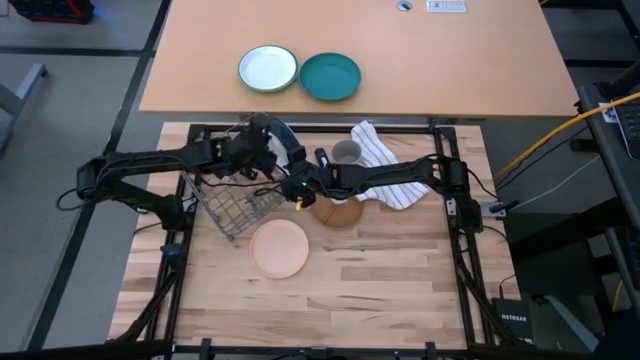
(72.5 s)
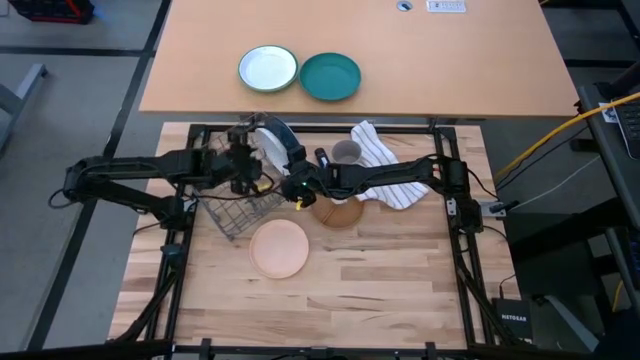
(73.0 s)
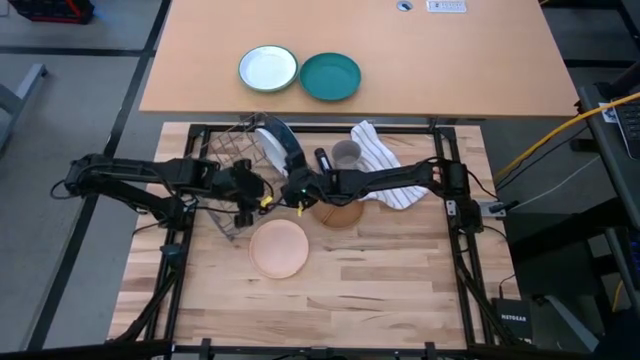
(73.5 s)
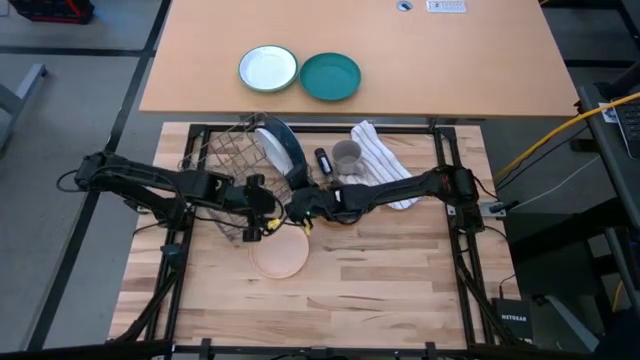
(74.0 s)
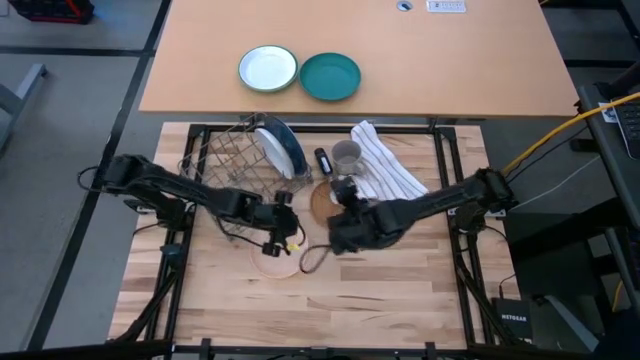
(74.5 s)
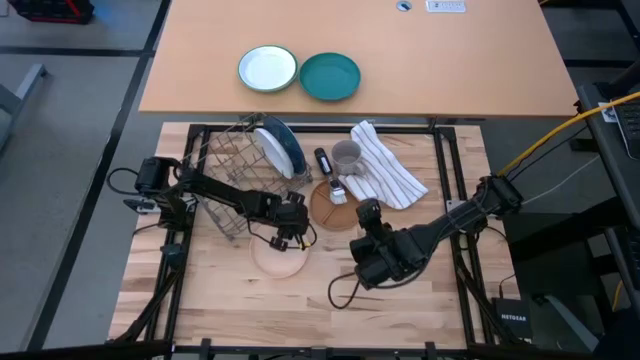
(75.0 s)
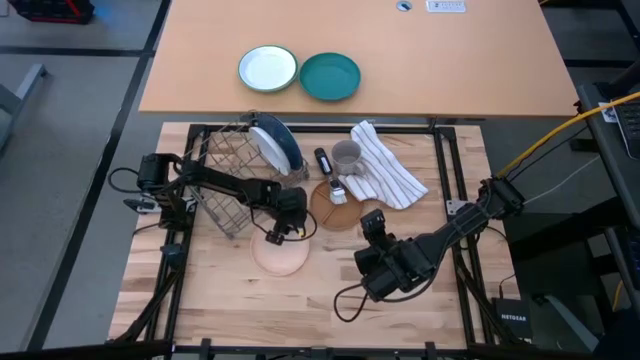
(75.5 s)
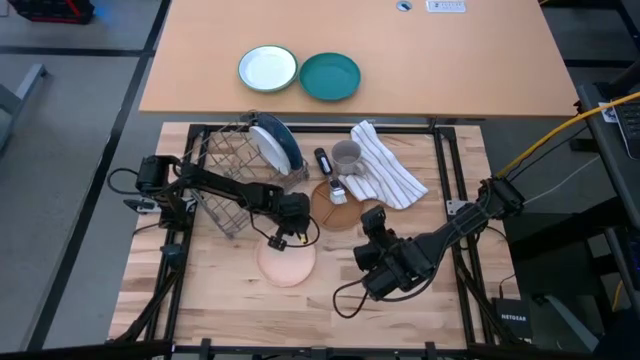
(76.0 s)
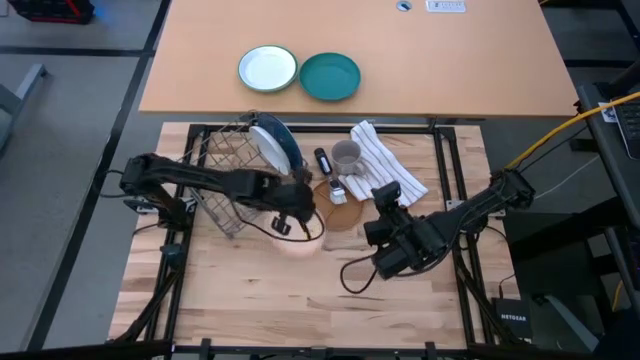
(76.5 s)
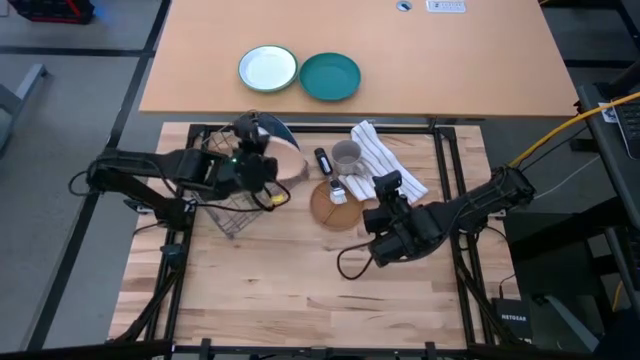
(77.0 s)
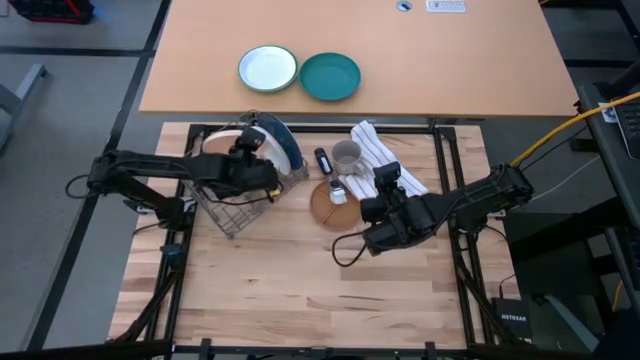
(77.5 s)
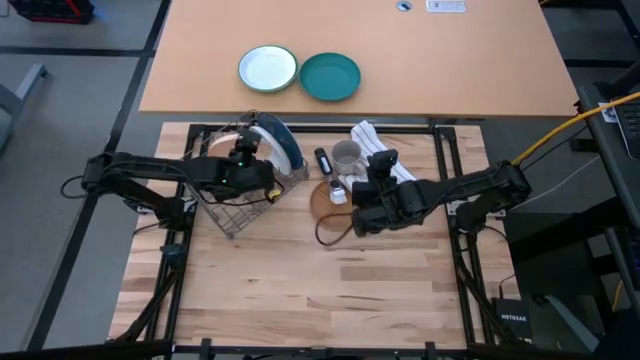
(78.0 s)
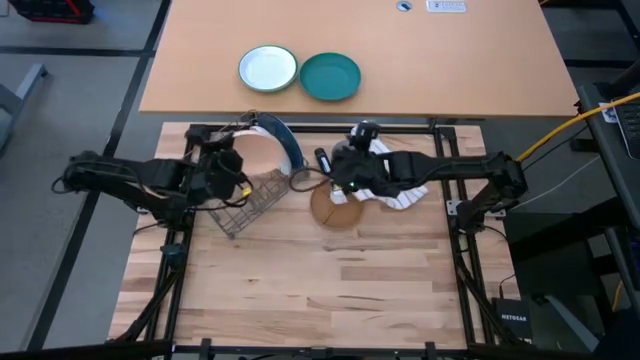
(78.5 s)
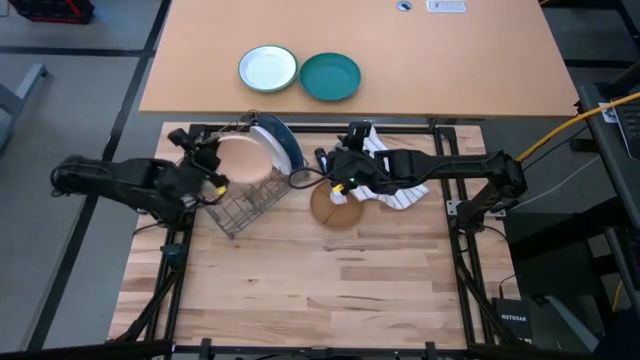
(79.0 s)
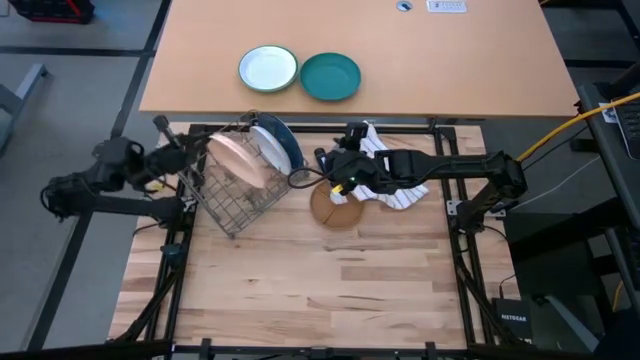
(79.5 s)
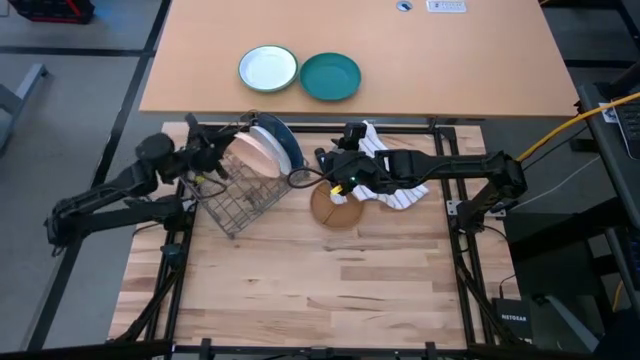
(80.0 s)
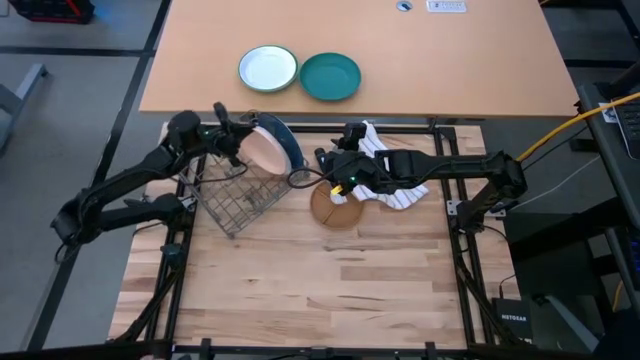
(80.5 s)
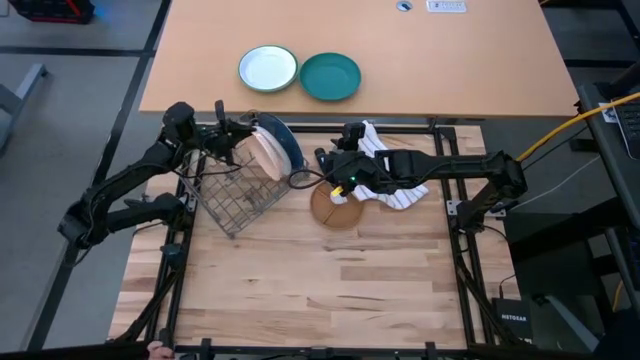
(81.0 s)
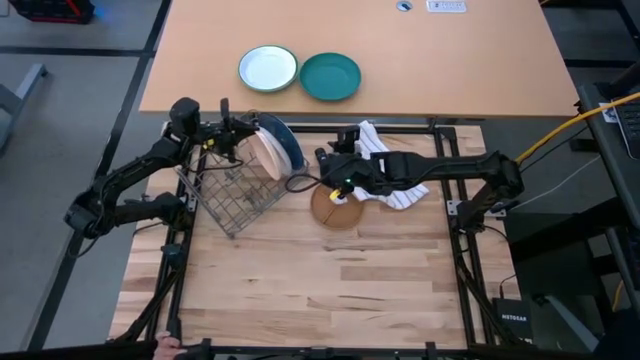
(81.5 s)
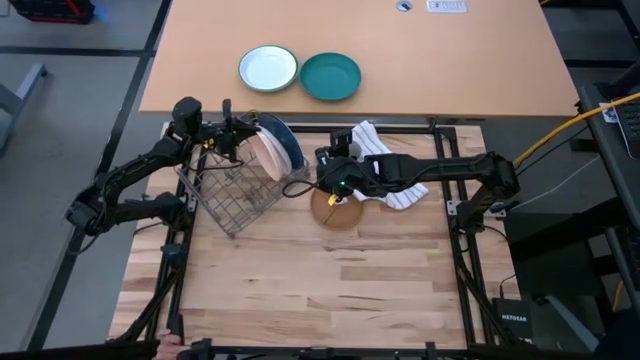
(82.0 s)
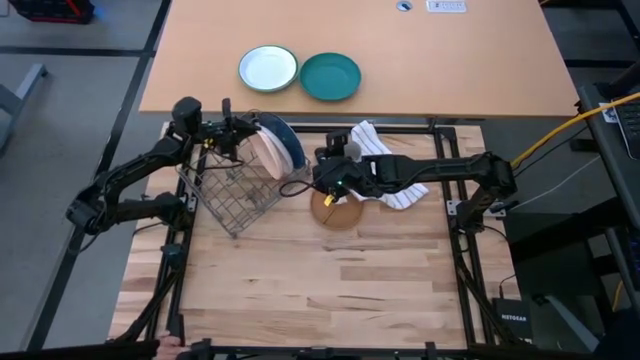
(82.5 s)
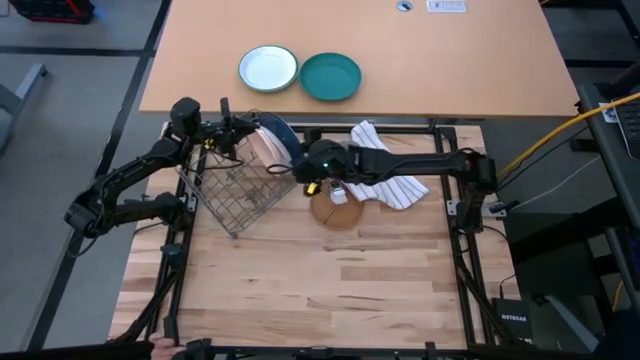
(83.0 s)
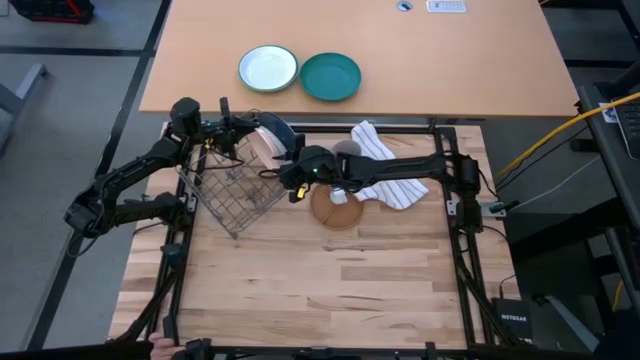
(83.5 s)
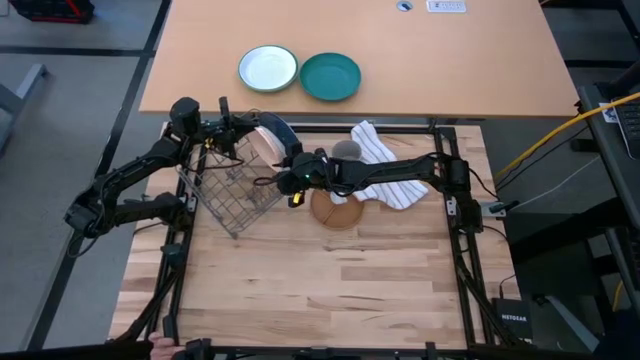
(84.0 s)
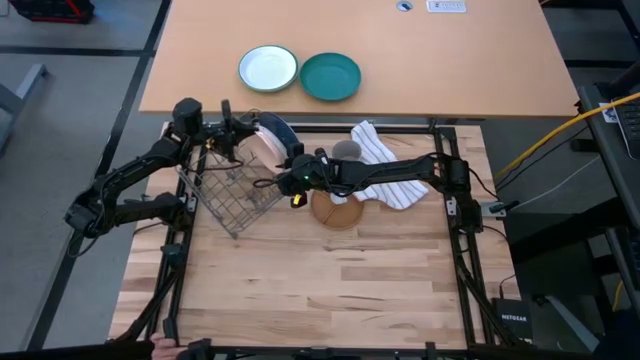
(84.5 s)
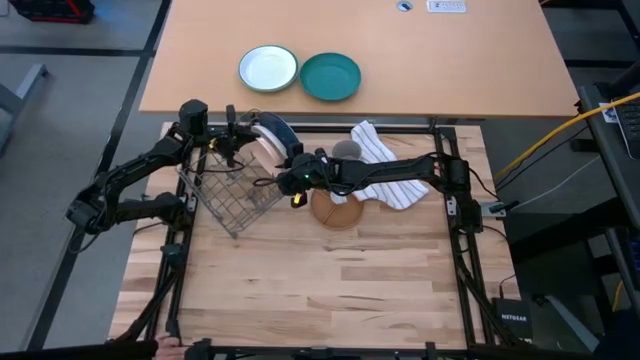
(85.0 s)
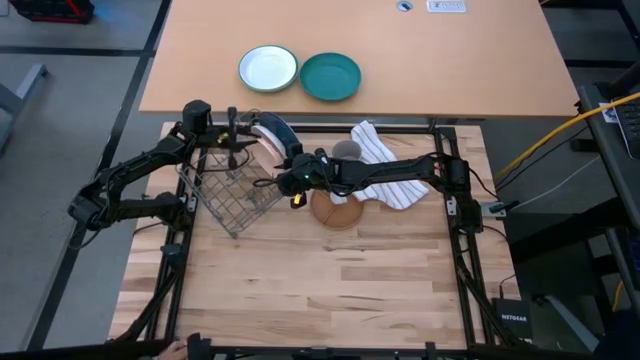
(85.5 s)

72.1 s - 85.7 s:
Task: Sort dishes
Put the light orange plate into the dish rack

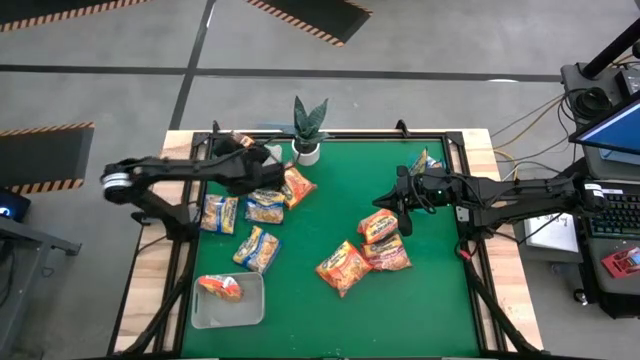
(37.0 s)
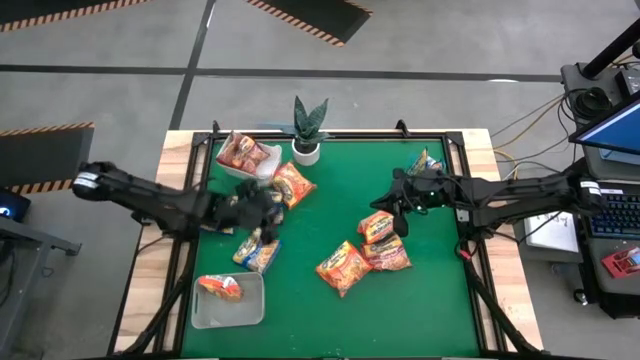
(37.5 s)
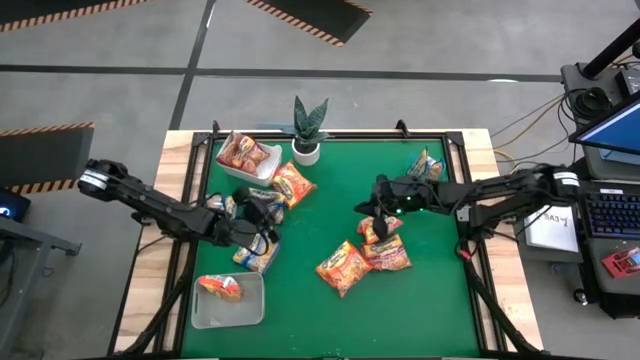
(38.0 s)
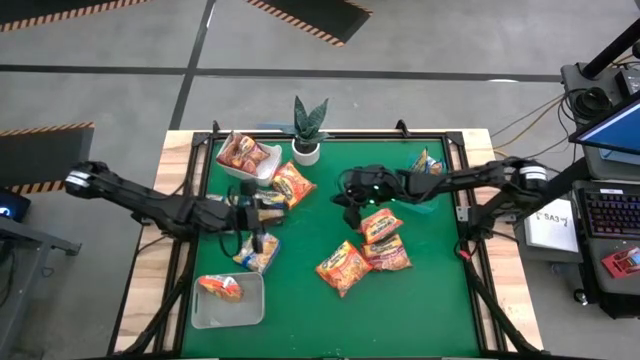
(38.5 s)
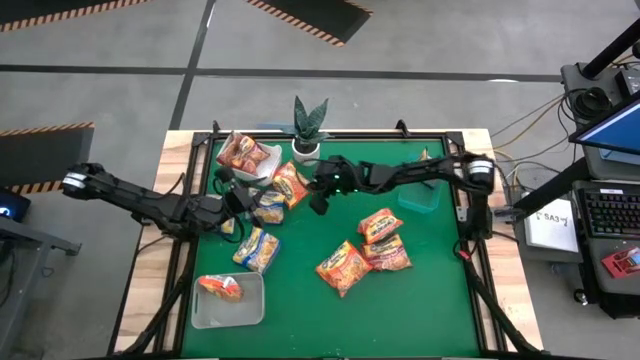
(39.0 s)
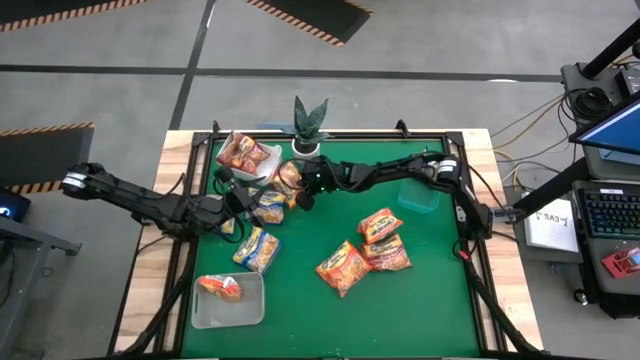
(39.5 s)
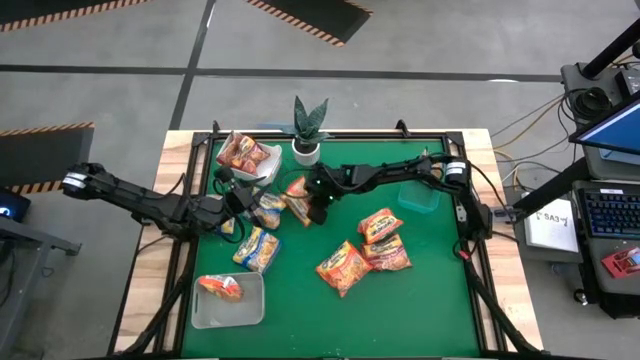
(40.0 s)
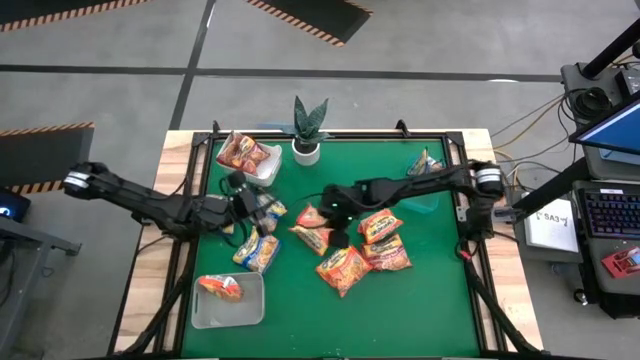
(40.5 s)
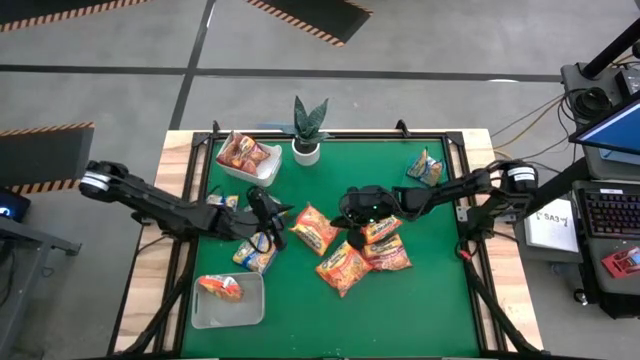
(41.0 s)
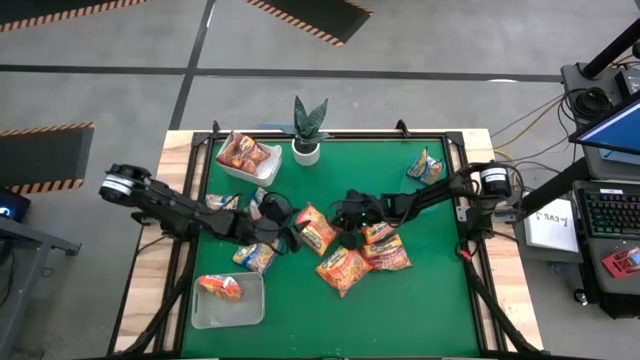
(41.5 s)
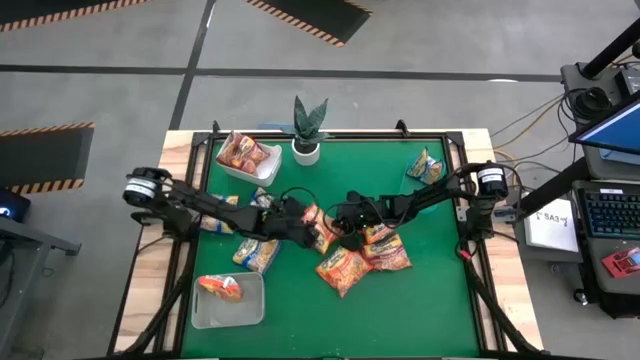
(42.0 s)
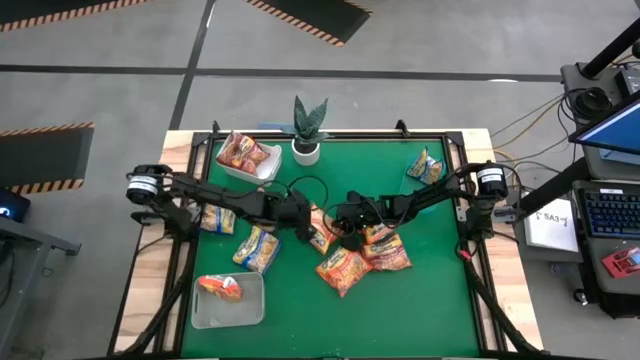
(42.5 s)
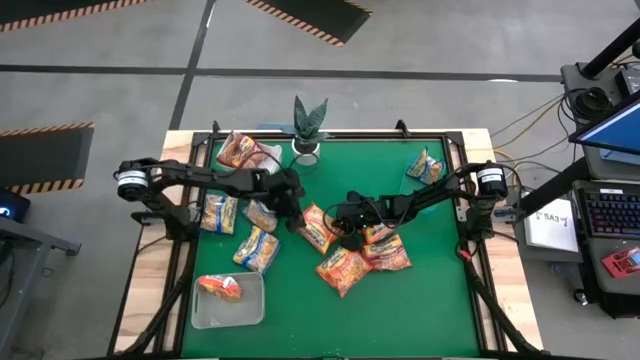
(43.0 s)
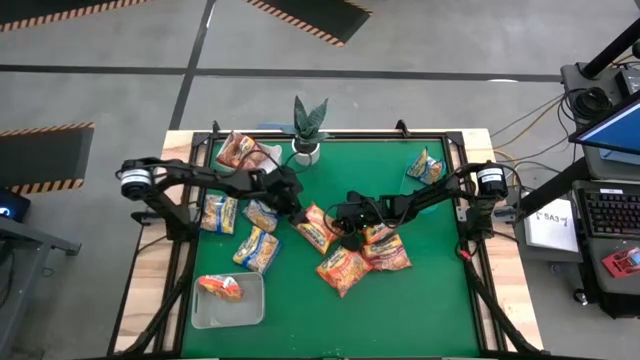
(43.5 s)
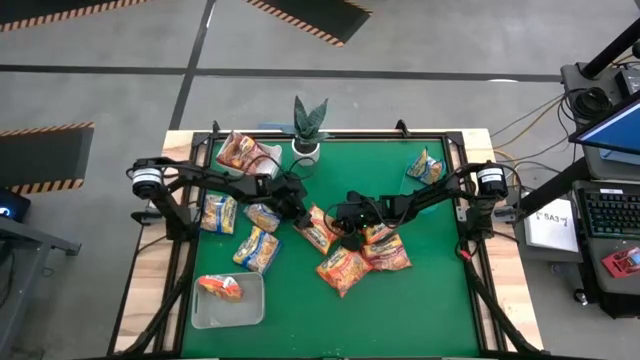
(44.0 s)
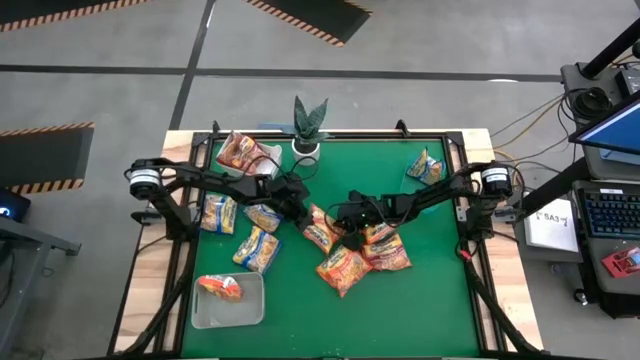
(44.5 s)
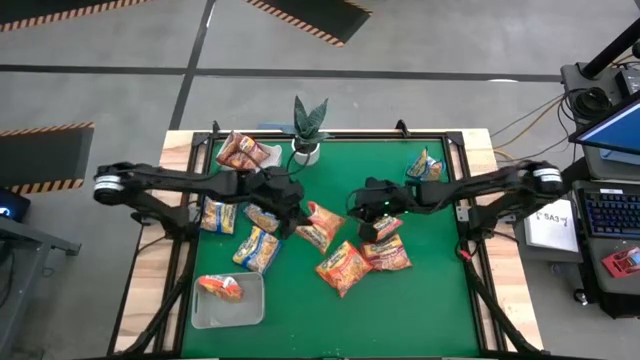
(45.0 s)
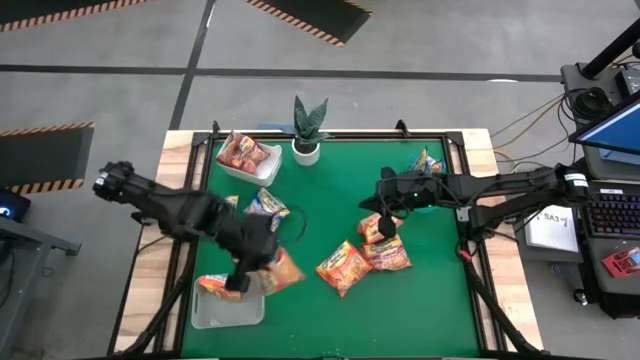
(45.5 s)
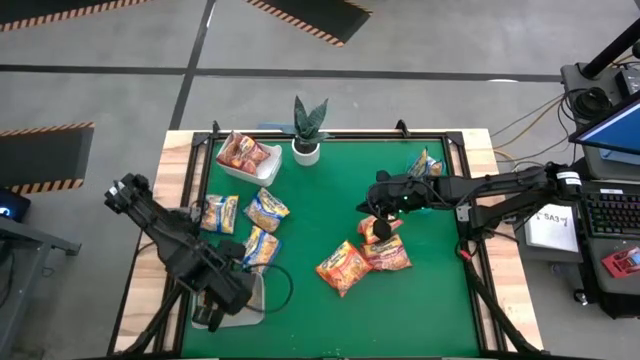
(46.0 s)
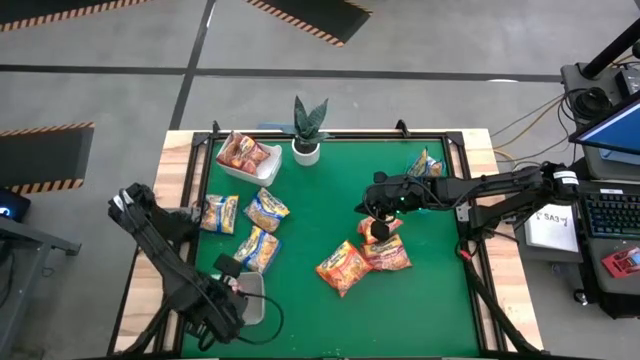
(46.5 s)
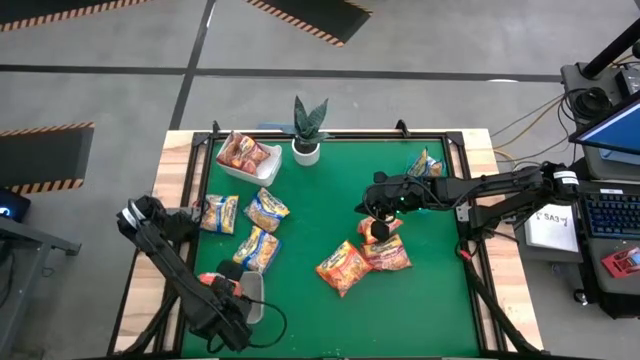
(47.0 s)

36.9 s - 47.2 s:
Task: Sort Maruchan noodles
Put the orange noodle pack into the gray bin
